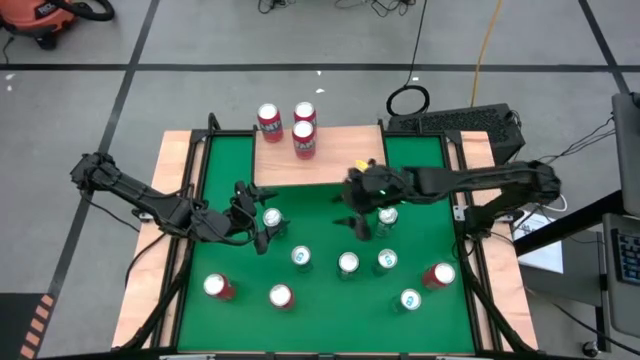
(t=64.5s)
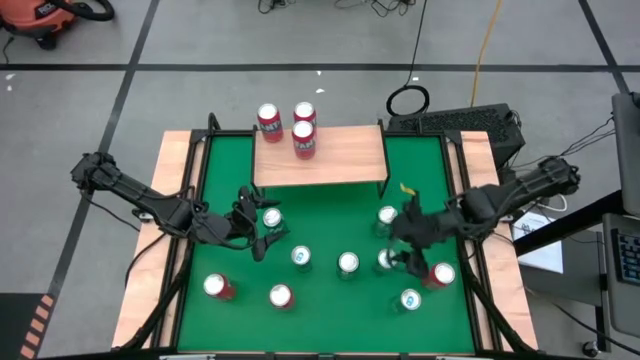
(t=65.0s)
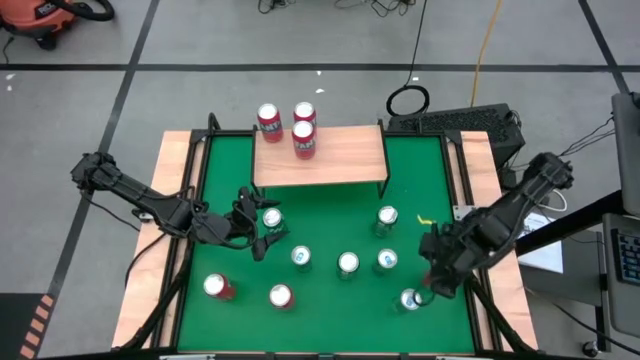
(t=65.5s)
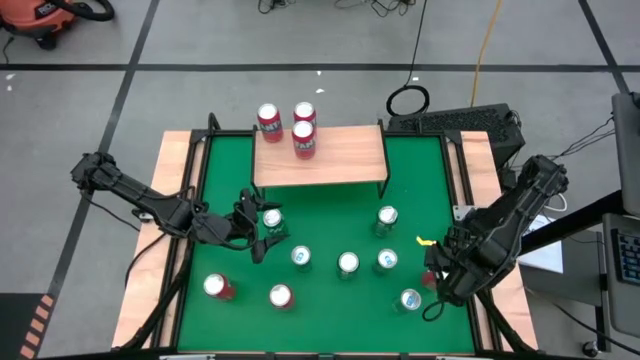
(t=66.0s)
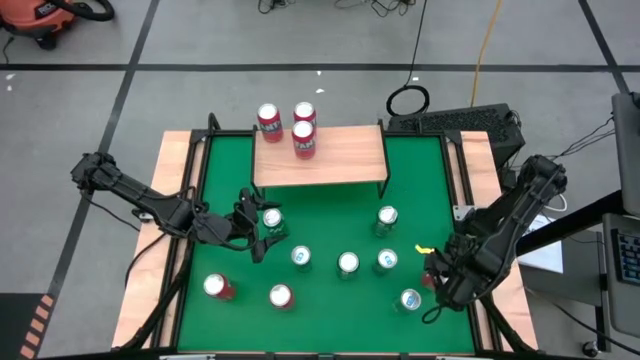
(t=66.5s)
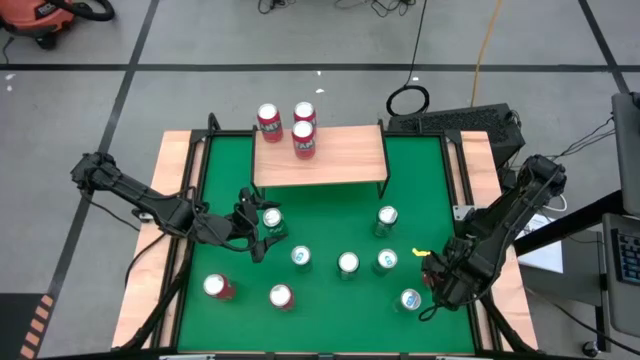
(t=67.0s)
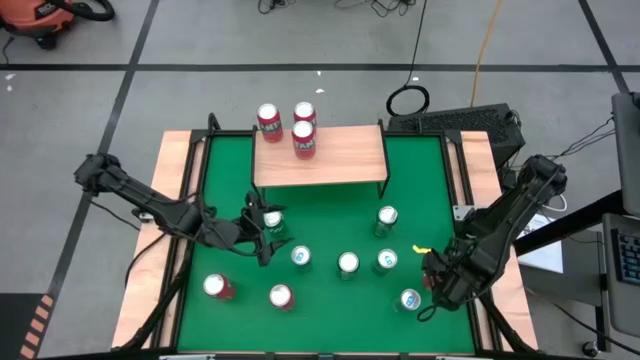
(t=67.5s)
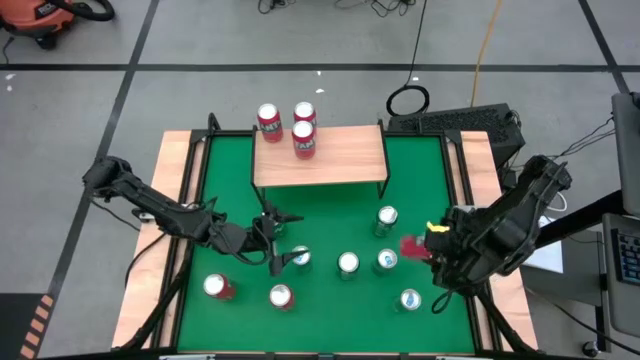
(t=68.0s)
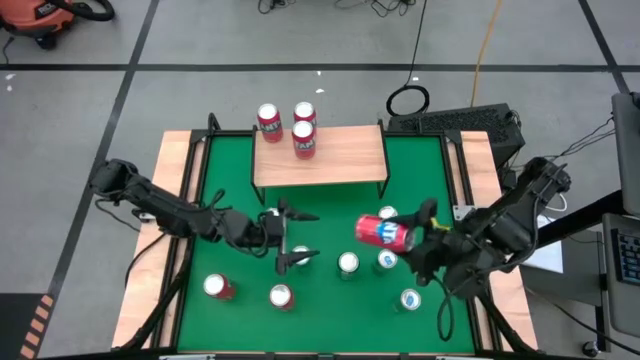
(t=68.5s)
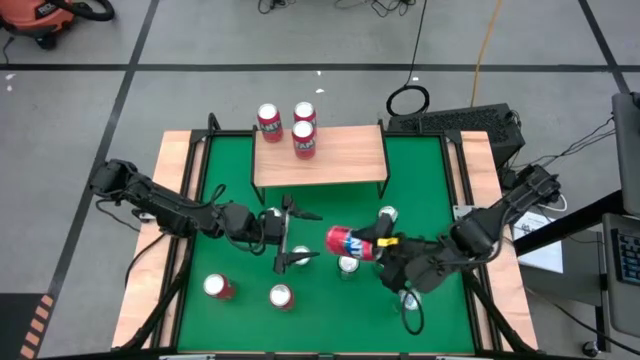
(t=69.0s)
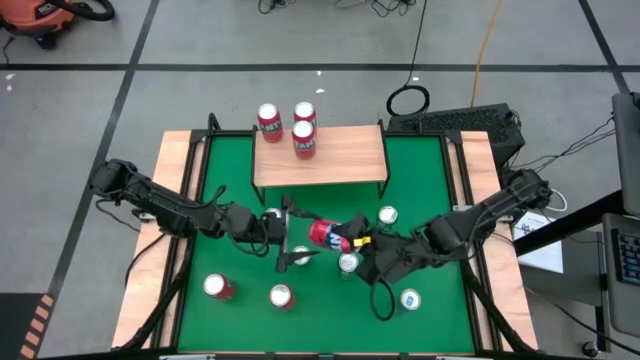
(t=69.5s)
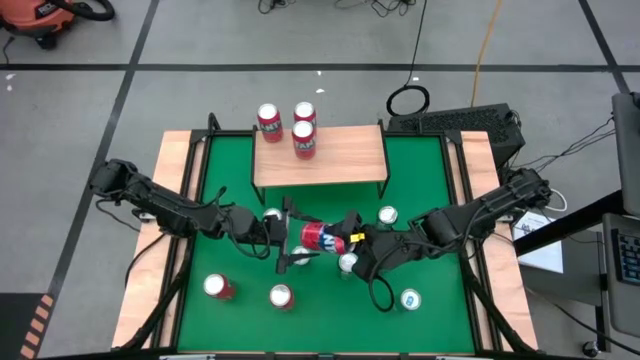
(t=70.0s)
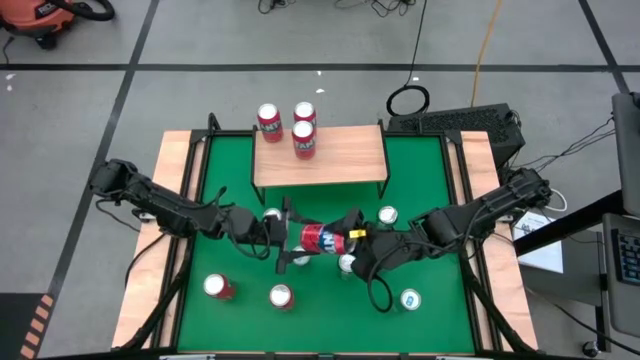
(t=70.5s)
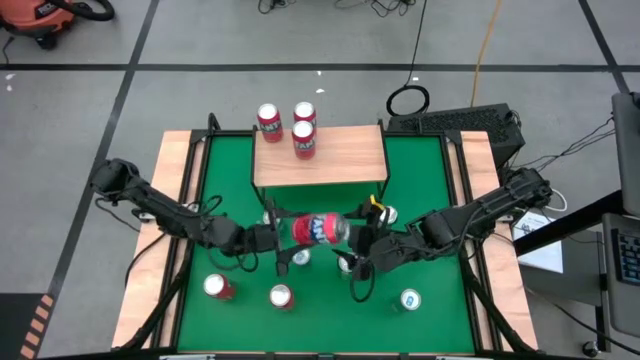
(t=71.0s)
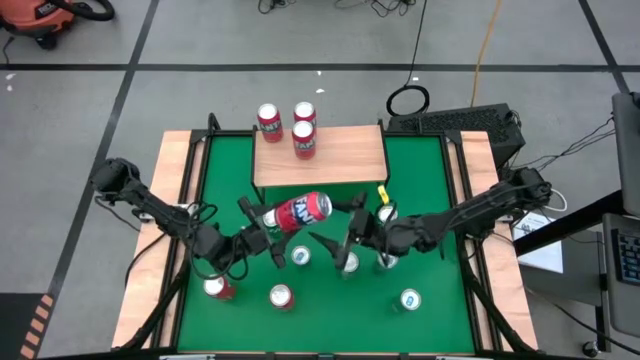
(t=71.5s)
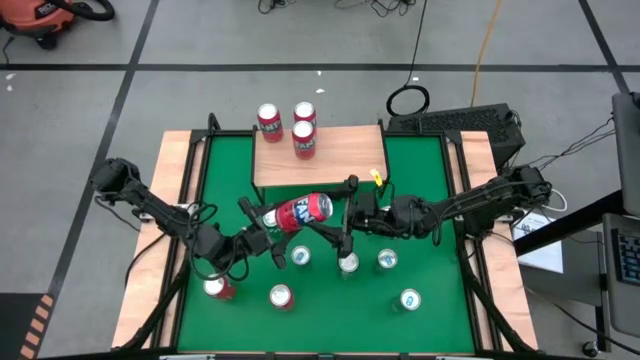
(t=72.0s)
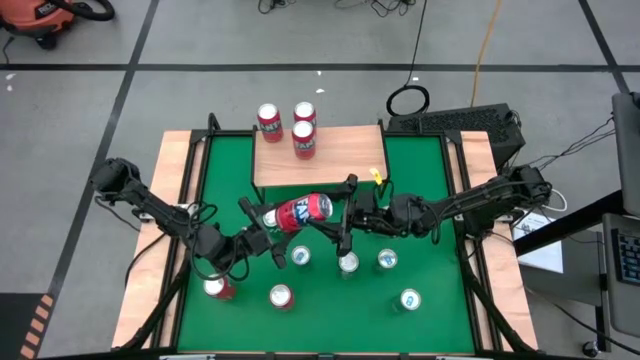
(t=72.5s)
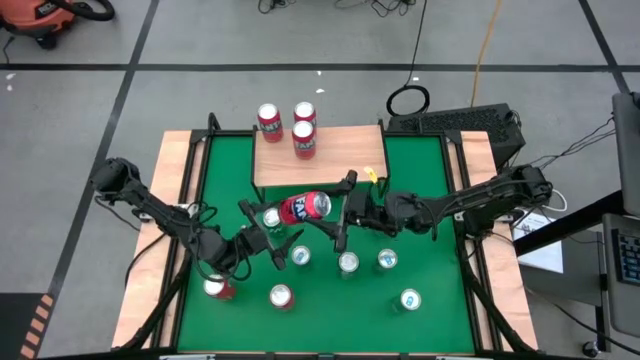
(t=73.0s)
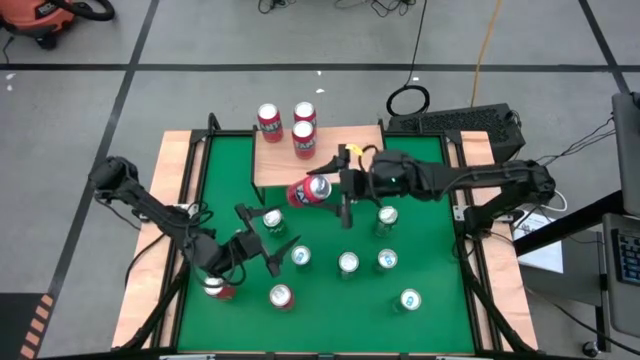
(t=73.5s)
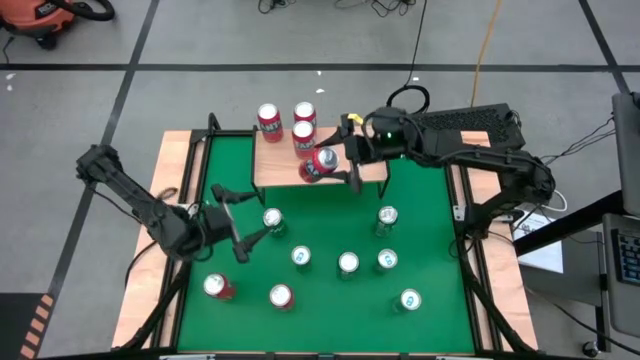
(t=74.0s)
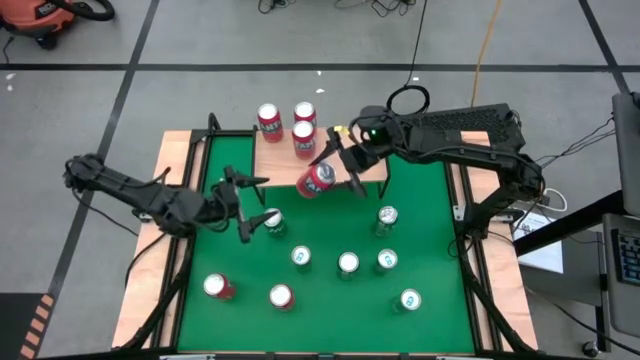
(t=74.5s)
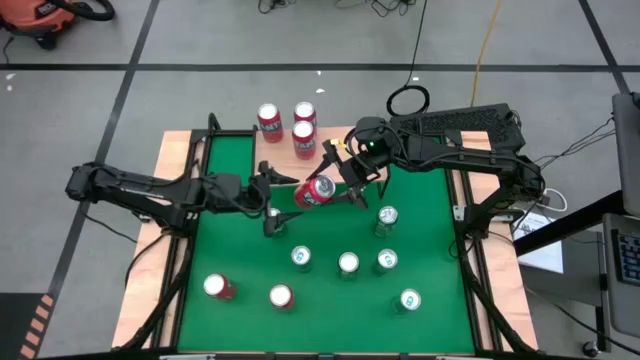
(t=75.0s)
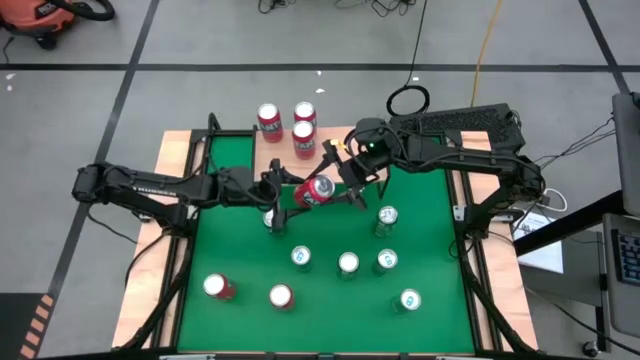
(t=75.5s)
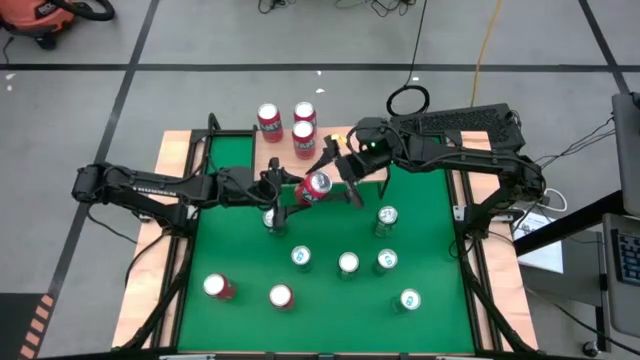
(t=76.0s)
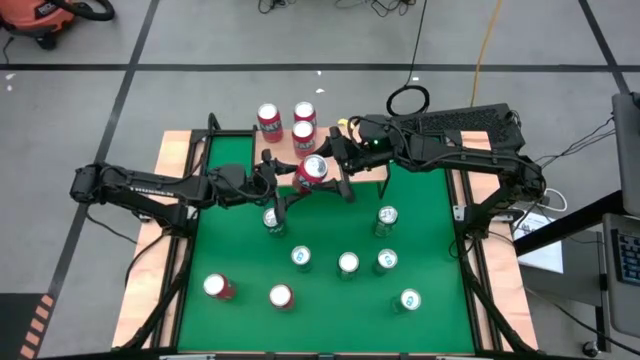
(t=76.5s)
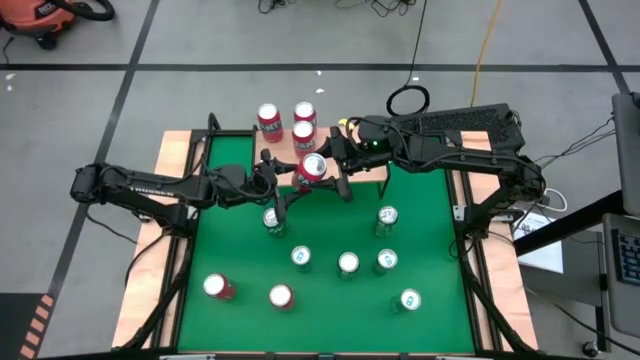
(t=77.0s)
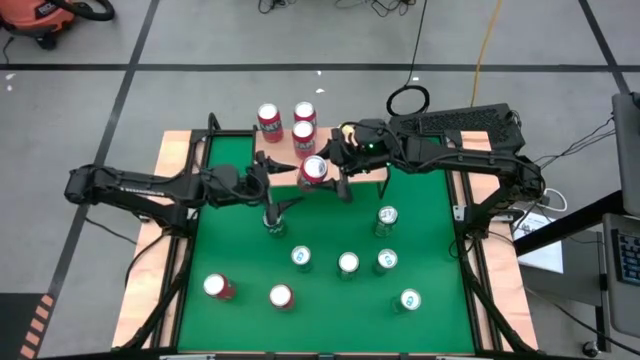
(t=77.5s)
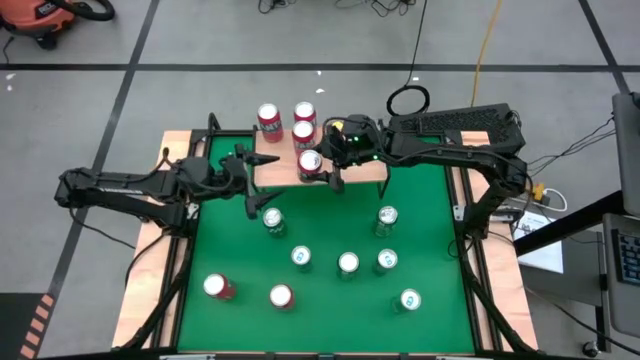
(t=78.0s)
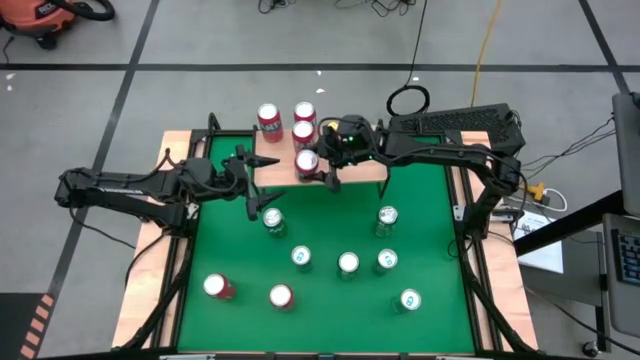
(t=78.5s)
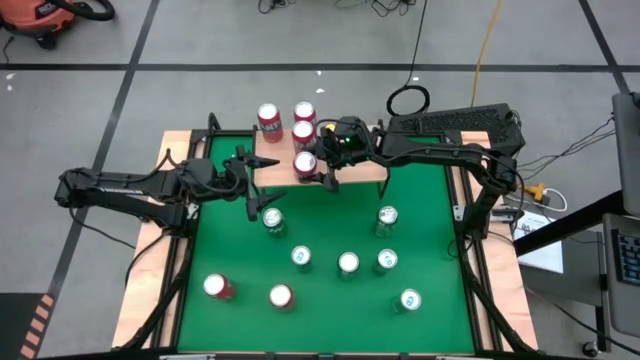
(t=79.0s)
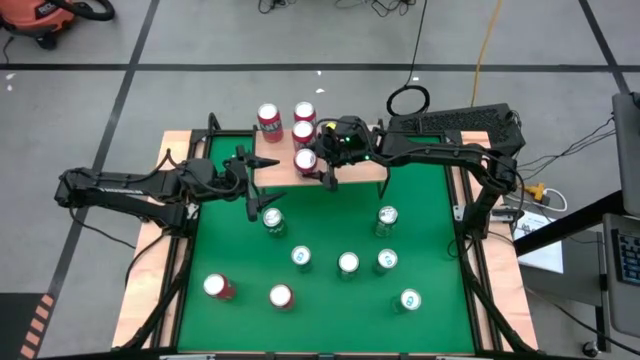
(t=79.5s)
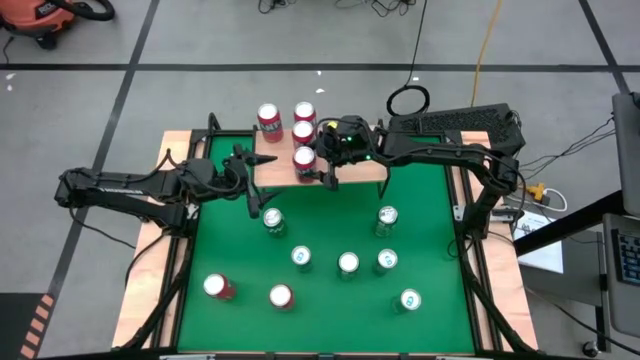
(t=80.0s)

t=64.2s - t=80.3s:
Task: Place canned beverage on shelf
Put the red soda can on the shelf aligned with the other red soda cans

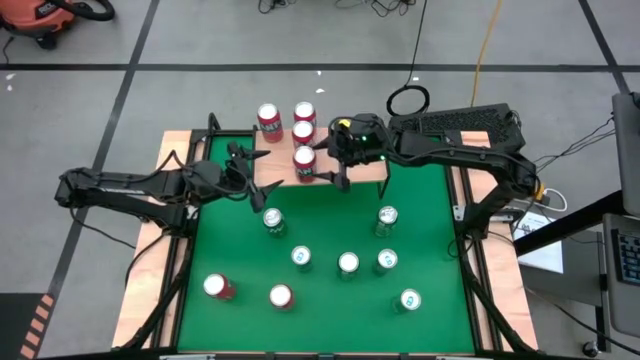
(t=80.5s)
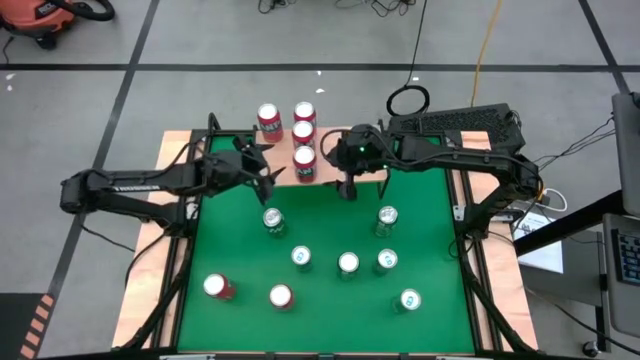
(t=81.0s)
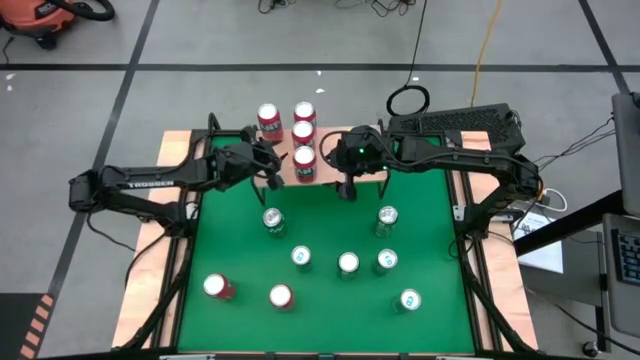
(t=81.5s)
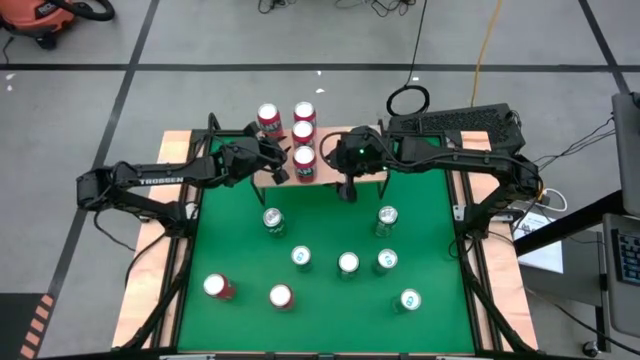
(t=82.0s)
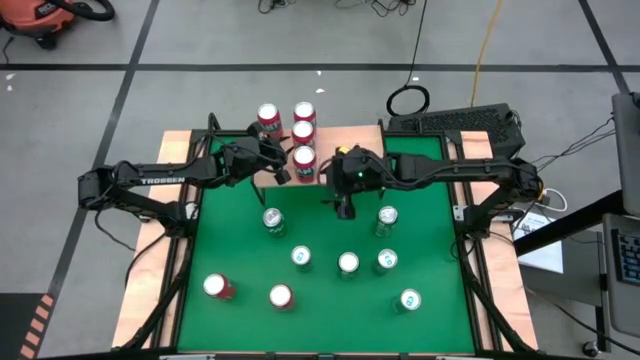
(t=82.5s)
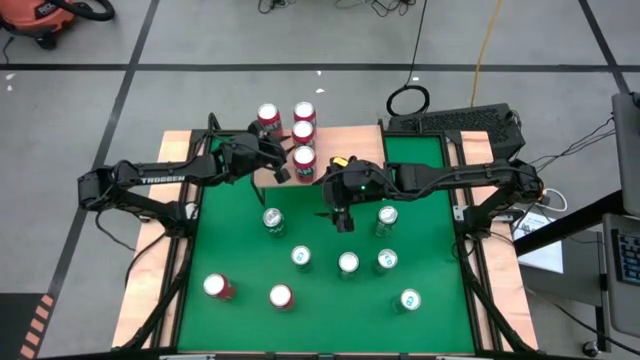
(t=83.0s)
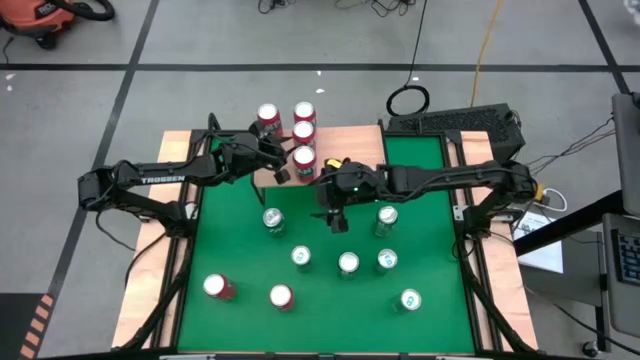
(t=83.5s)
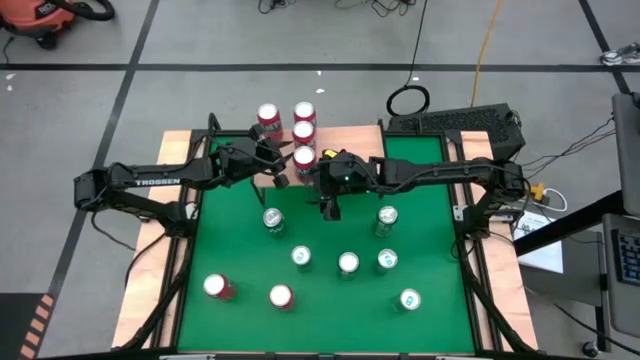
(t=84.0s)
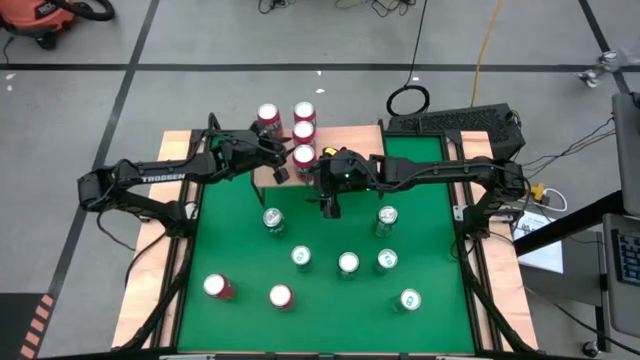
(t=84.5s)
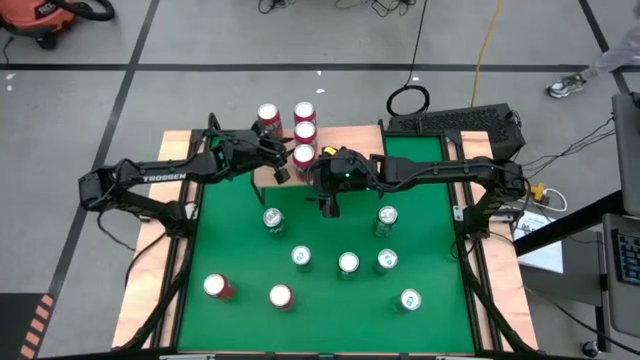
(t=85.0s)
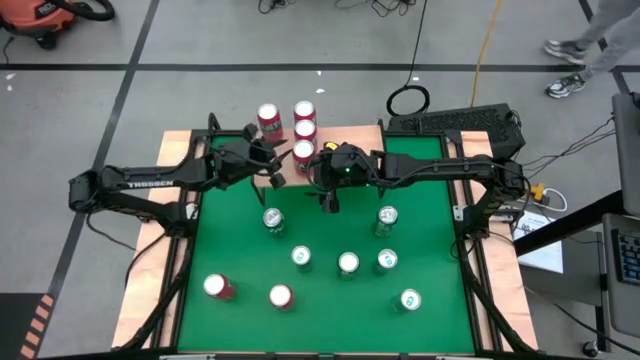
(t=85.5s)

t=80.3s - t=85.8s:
Adjust the red soda cans on the shelf
